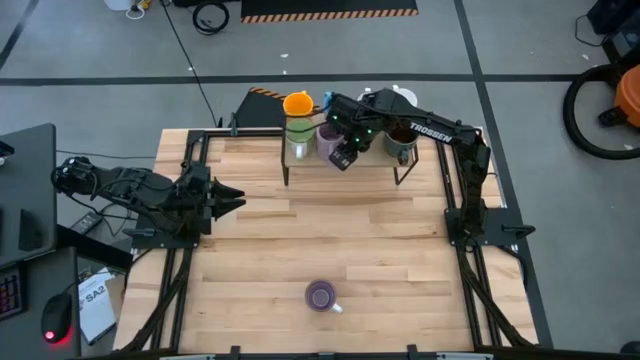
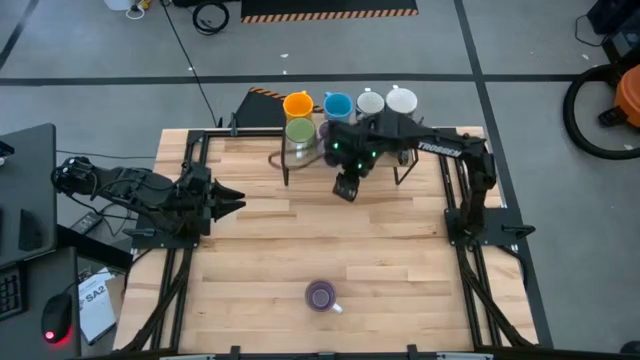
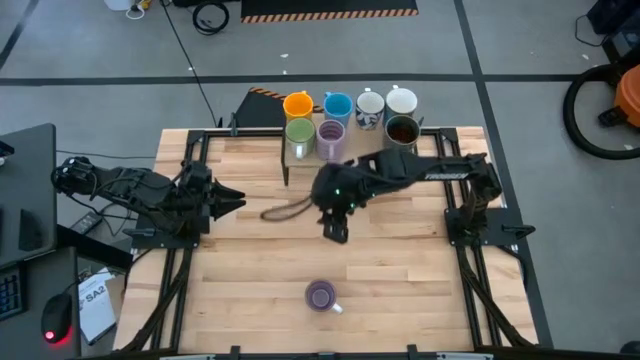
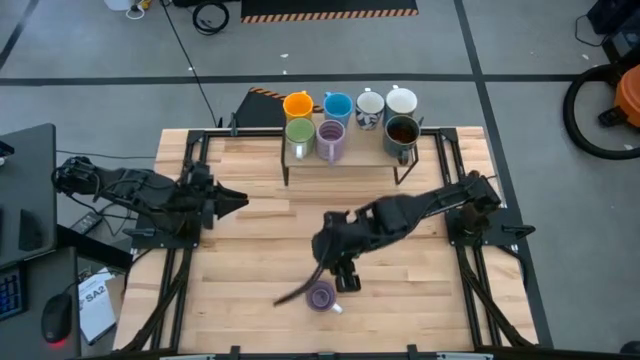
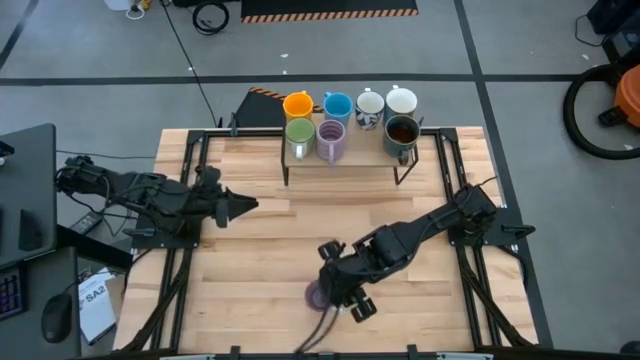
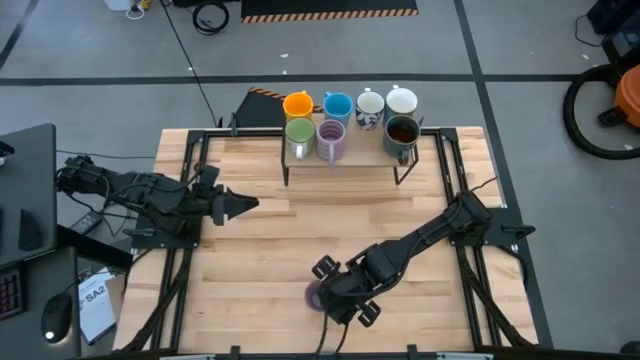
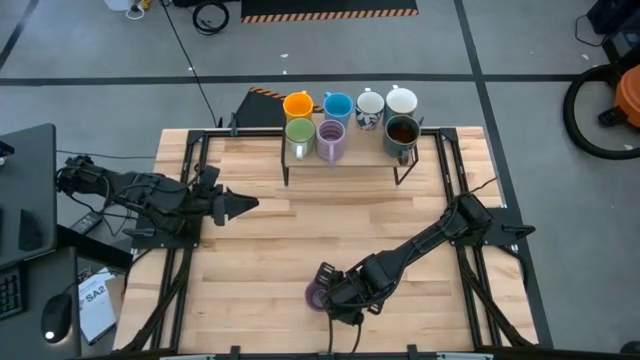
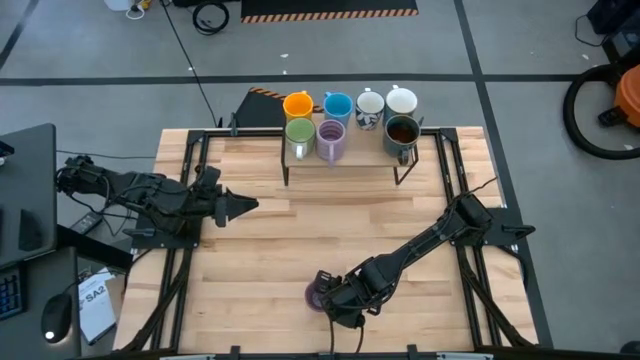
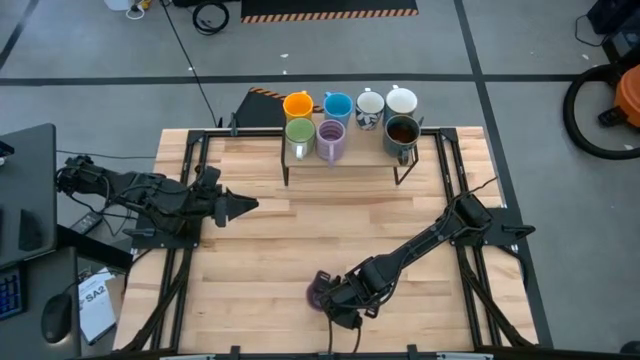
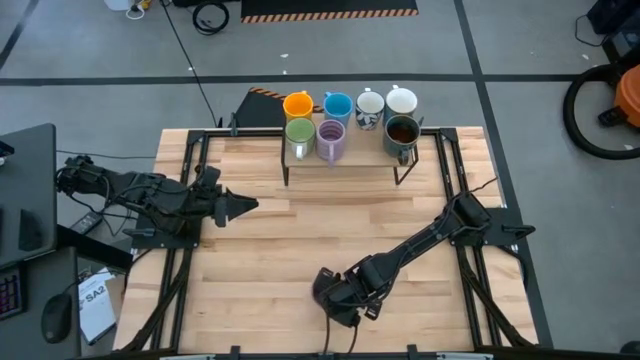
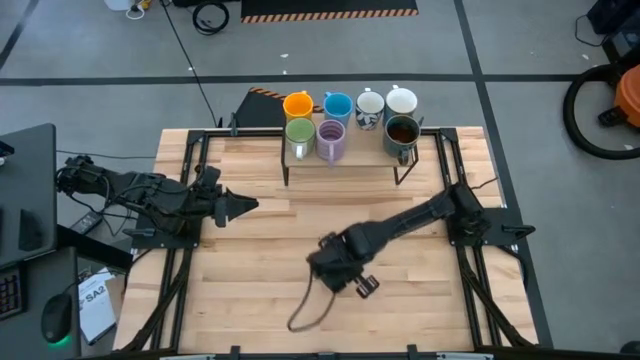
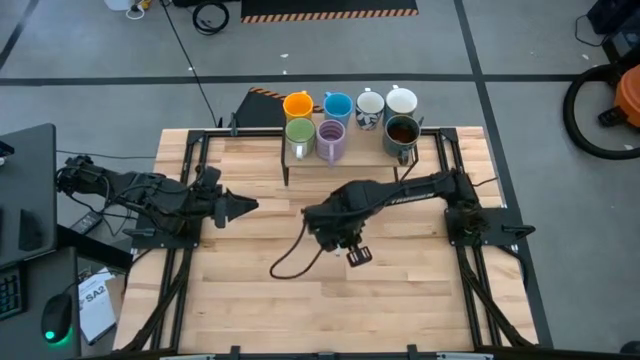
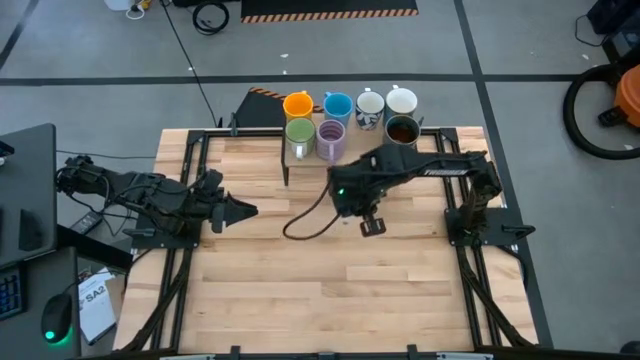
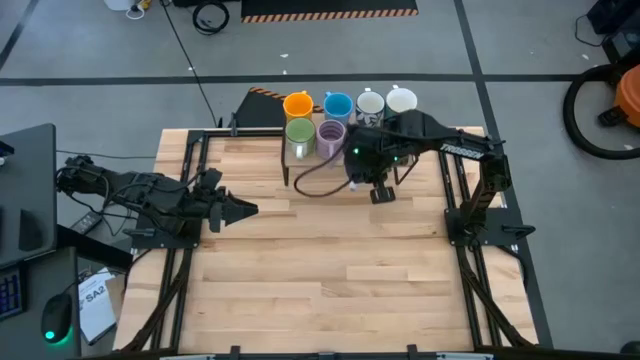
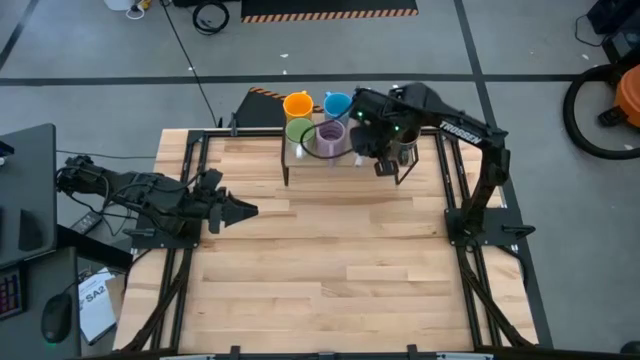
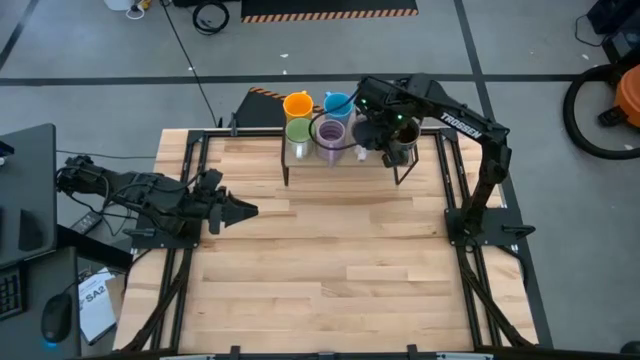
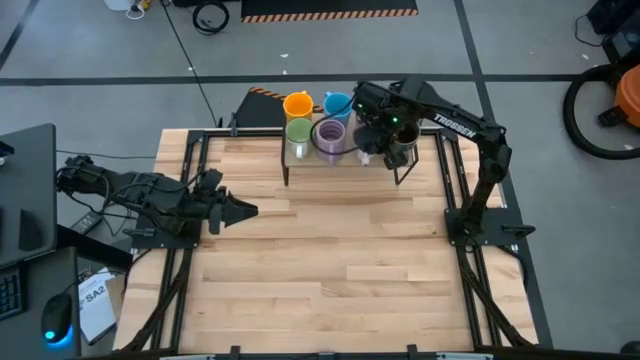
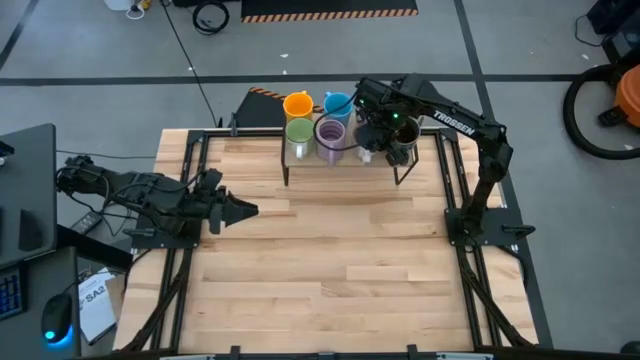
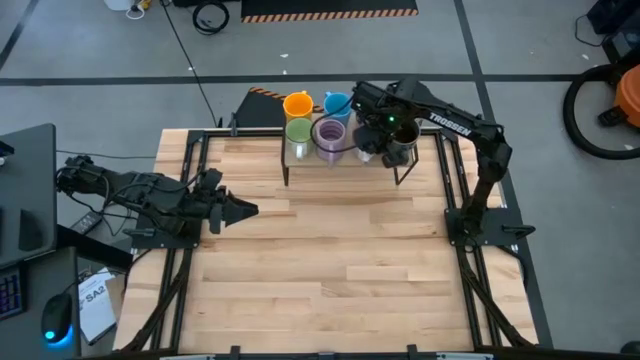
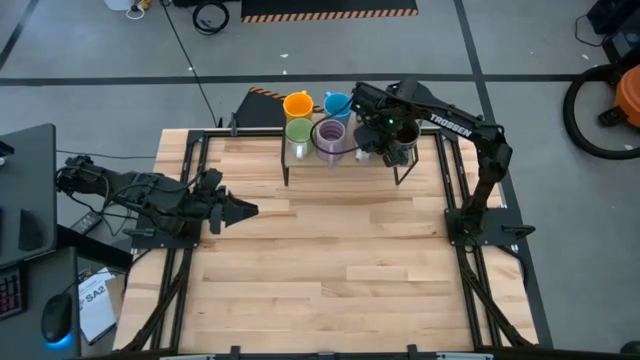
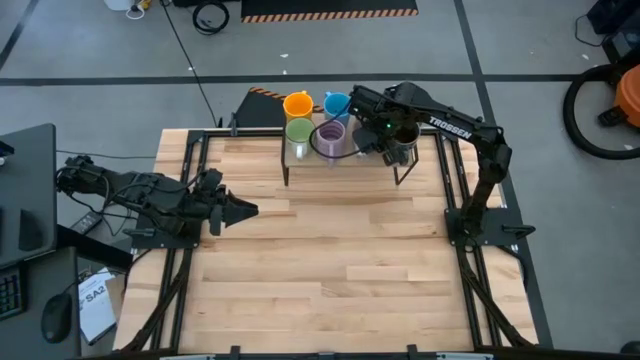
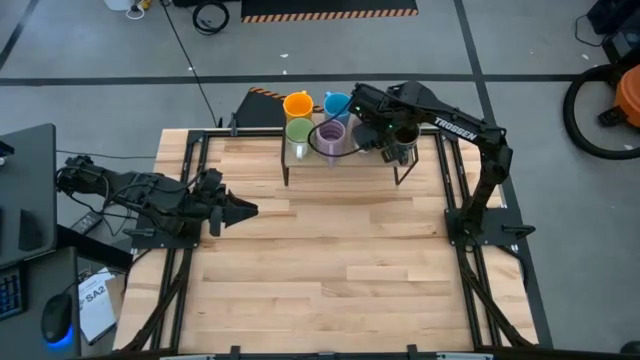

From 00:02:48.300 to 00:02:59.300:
Task: Place coffee mugs
Put the purple and white mug on the shelf

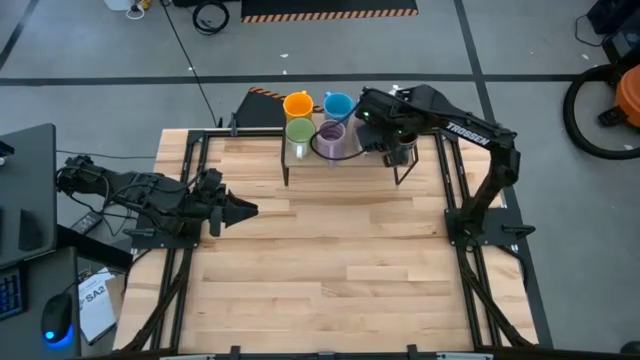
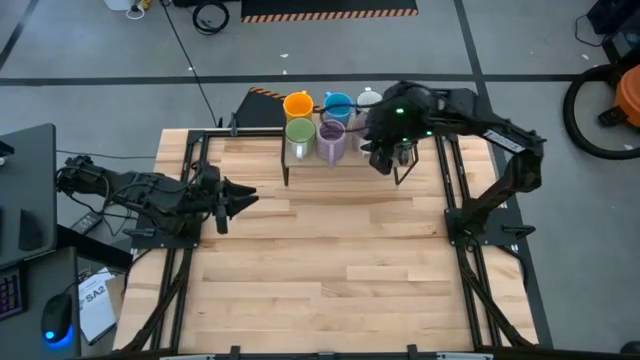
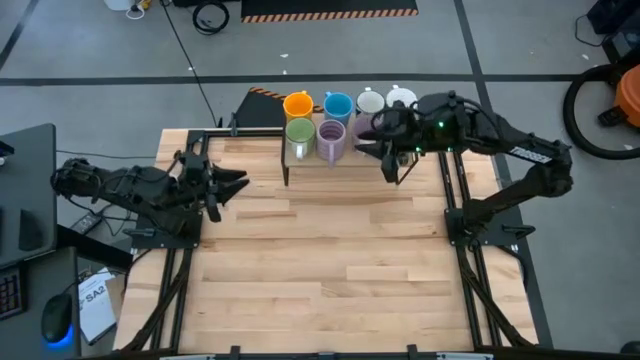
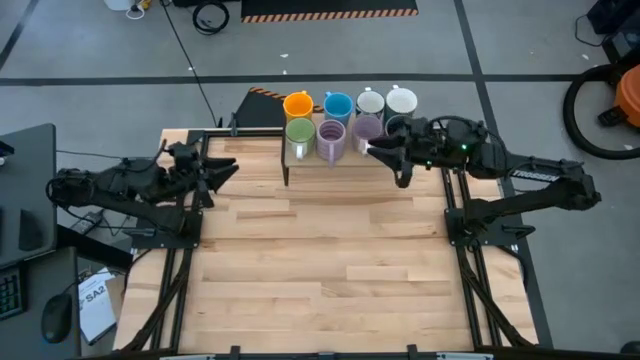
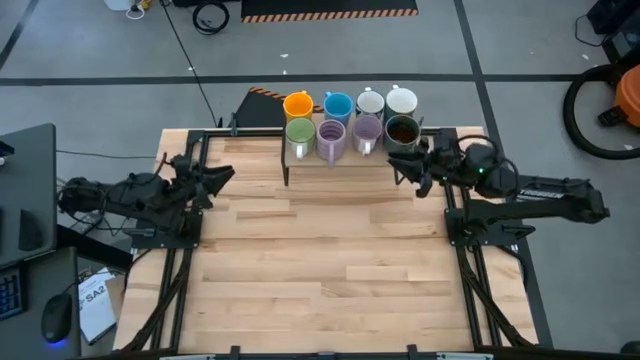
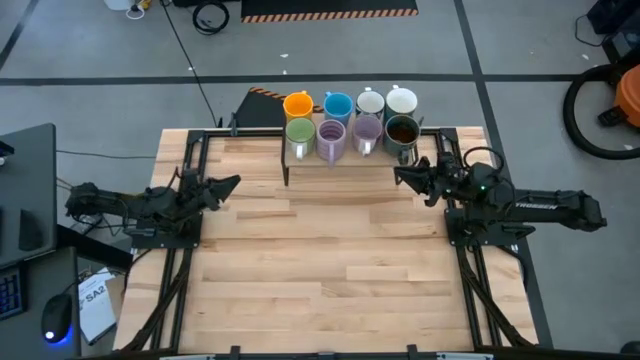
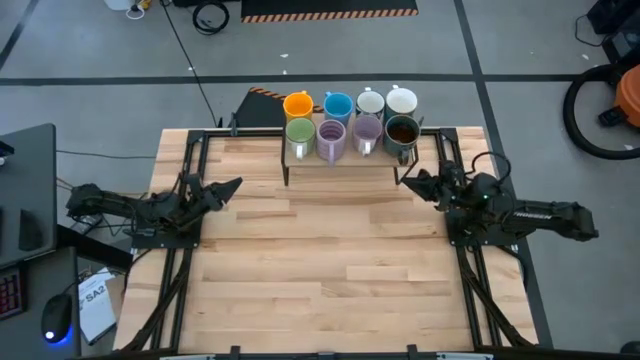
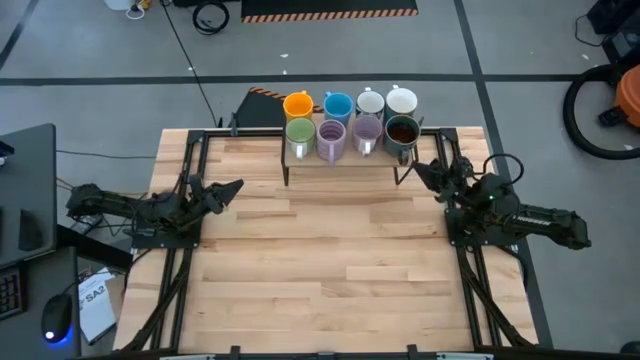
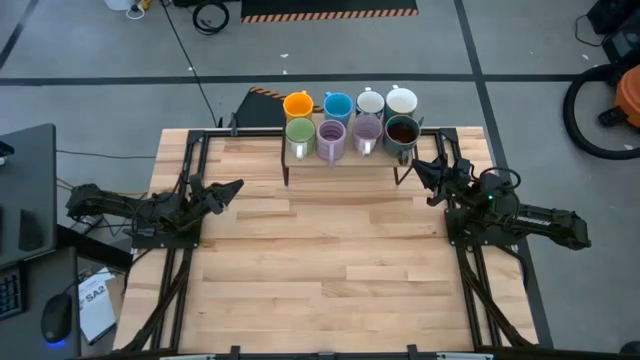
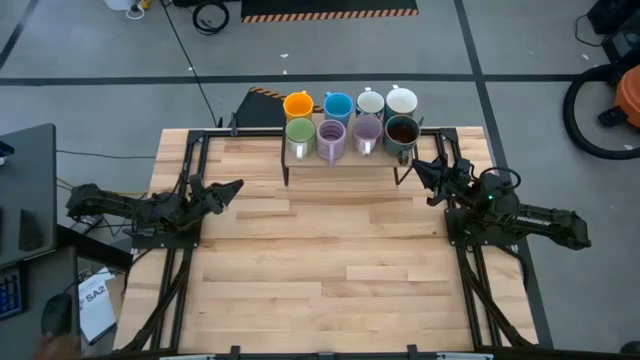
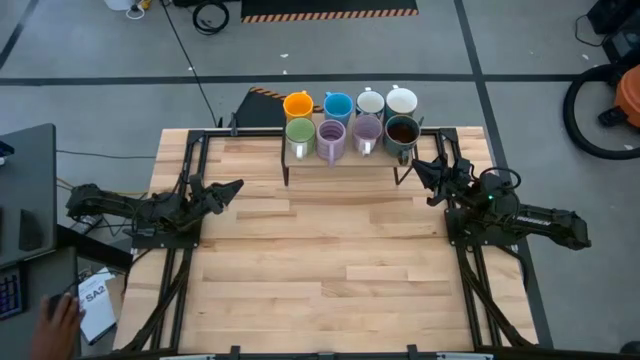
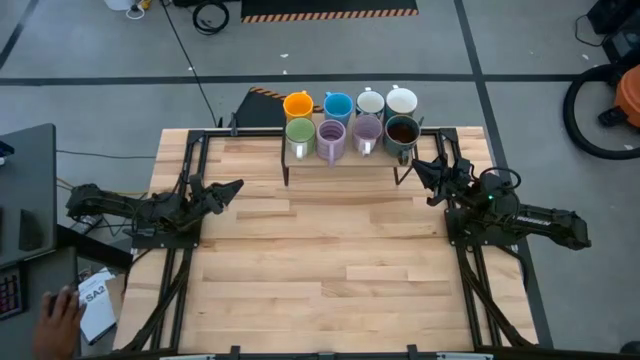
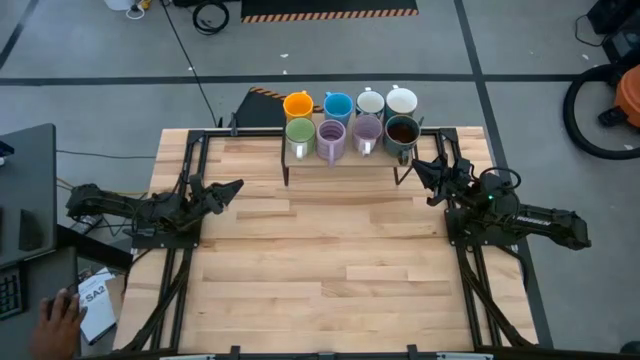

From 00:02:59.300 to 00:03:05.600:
Return to Home Position

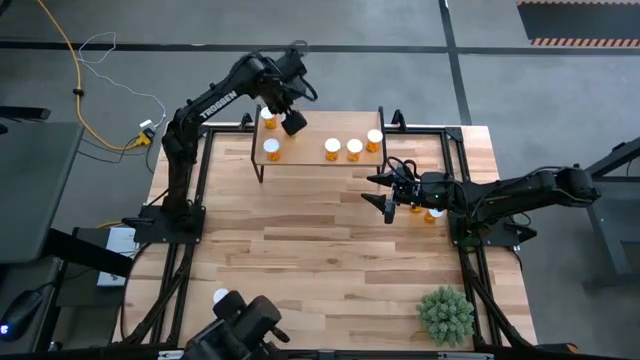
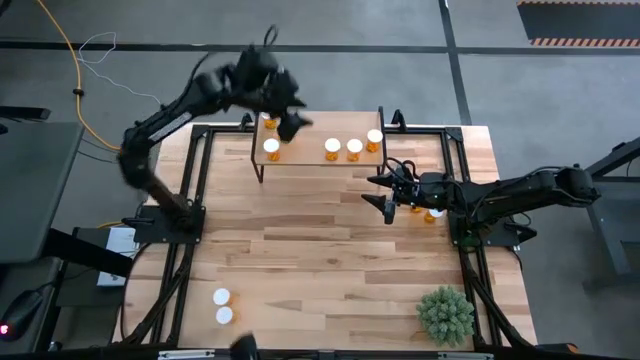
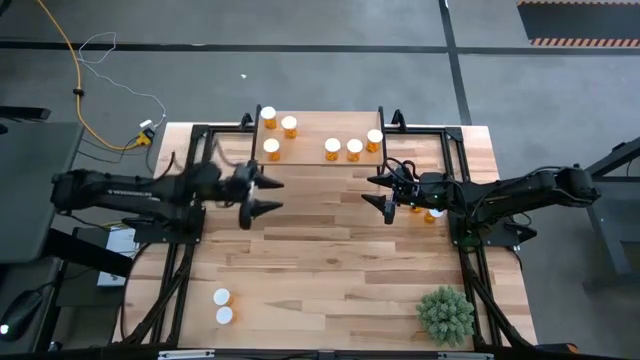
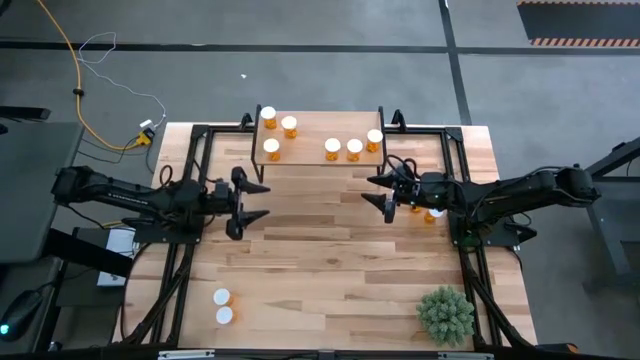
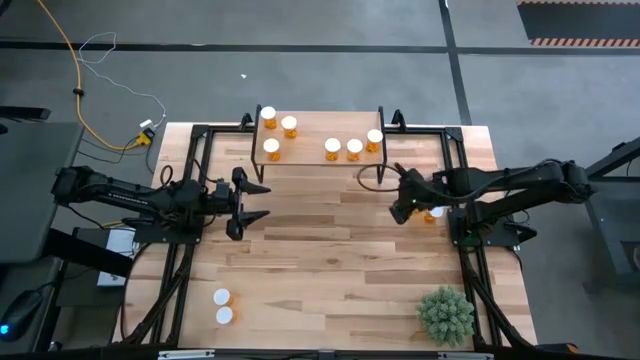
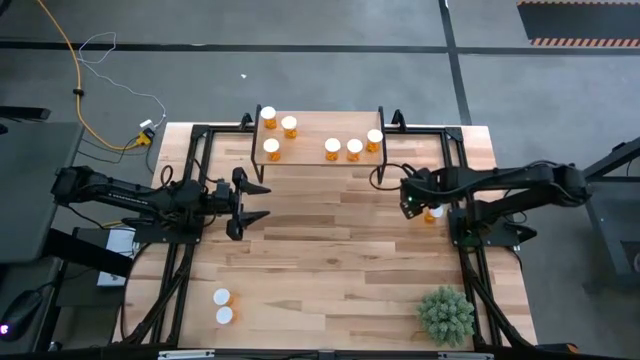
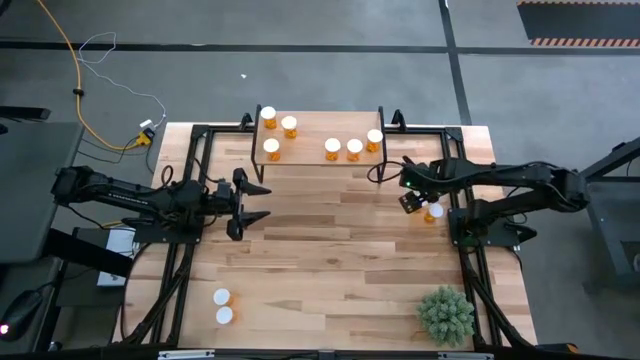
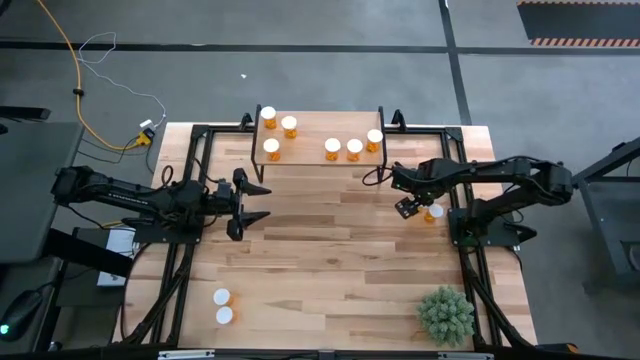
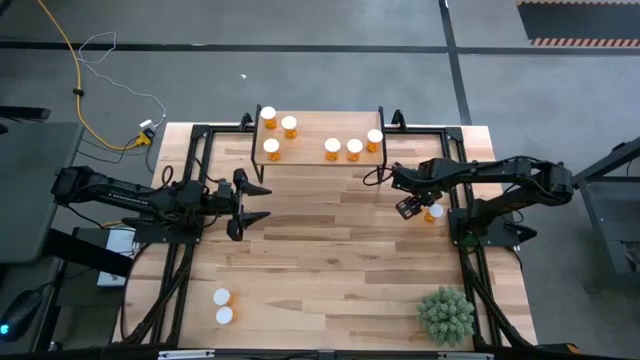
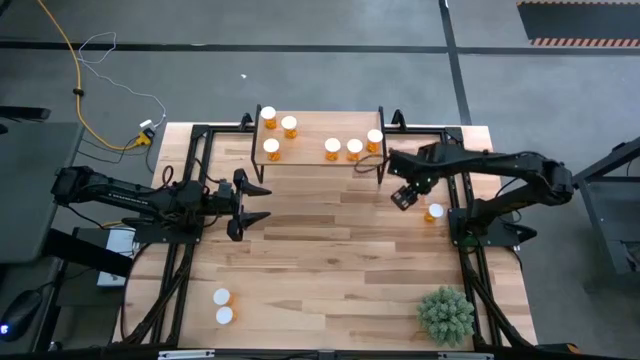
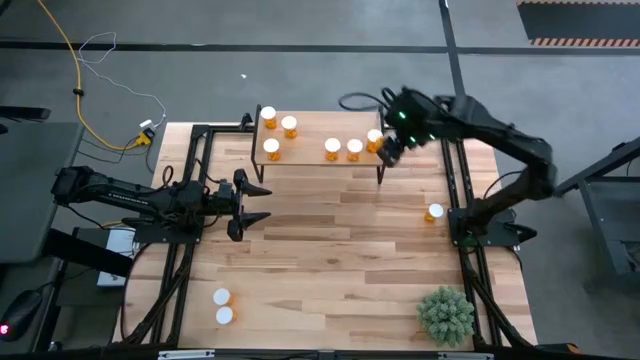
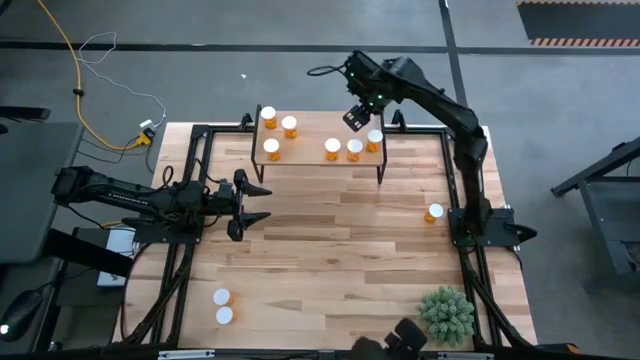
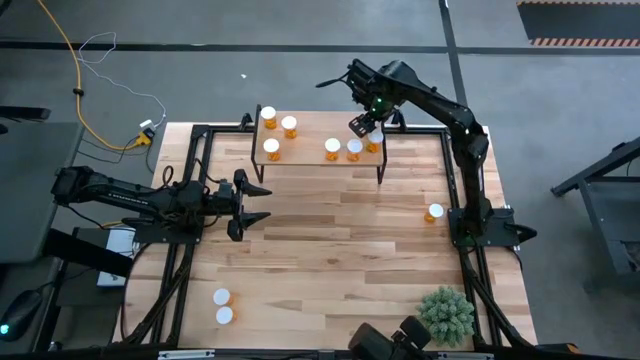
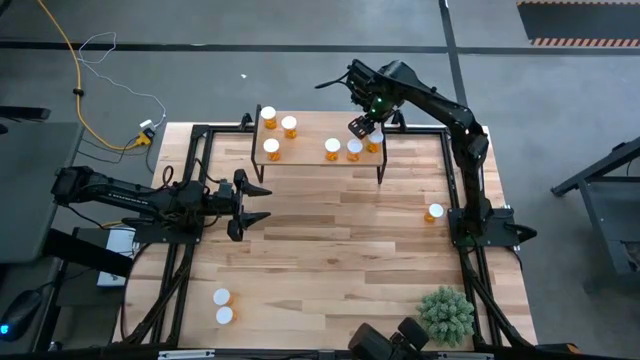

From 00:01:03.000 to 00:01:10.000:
Task: Pick and place medicine bottles onto shelf by color
Put the orange pill bottle on the shelf
